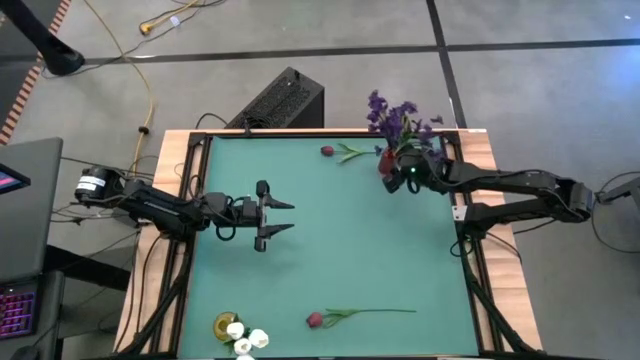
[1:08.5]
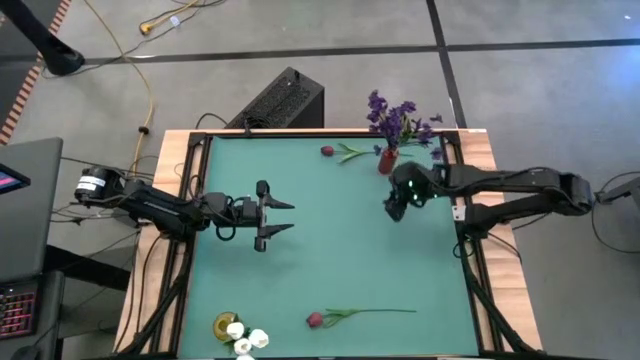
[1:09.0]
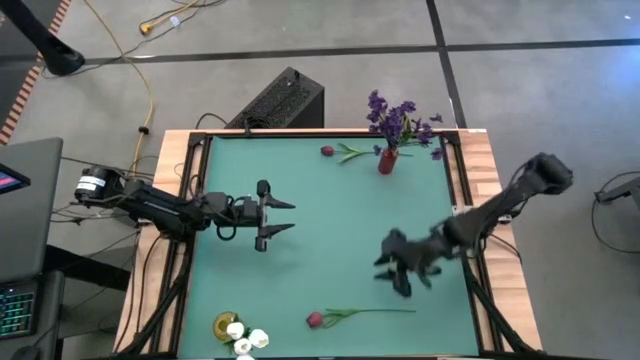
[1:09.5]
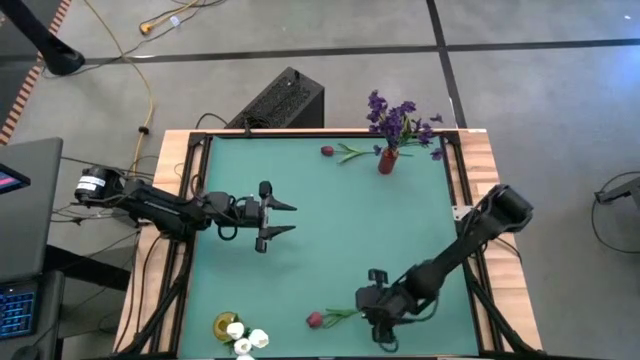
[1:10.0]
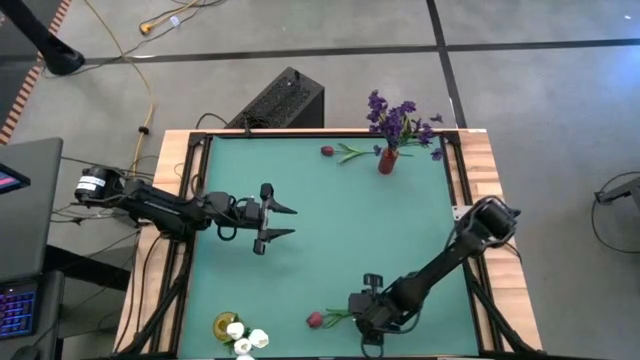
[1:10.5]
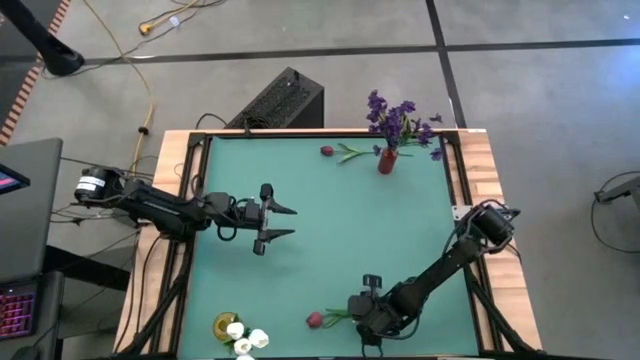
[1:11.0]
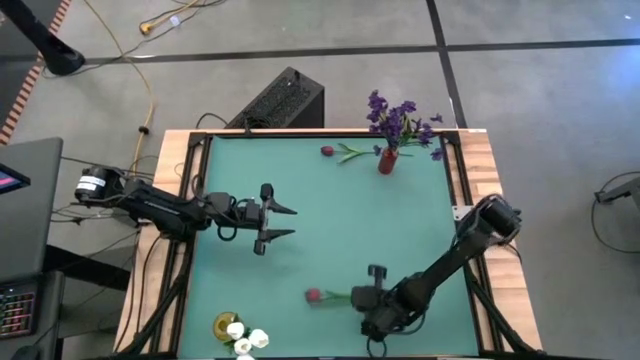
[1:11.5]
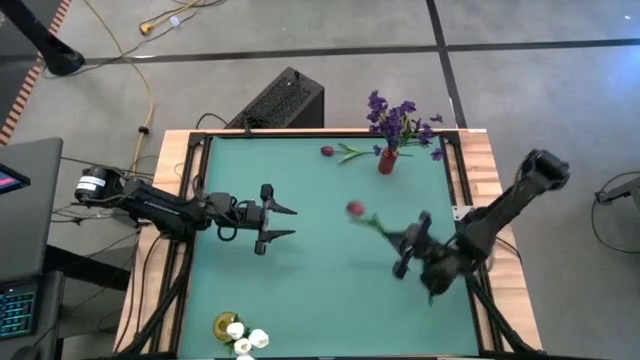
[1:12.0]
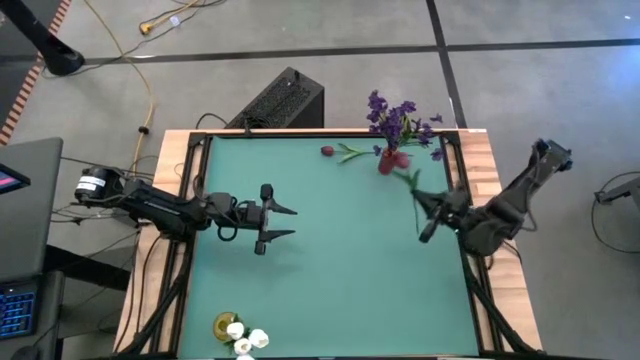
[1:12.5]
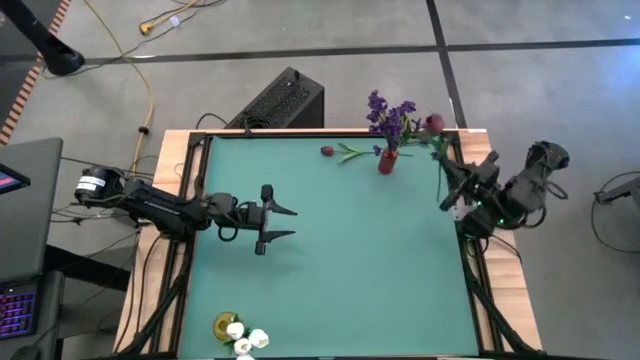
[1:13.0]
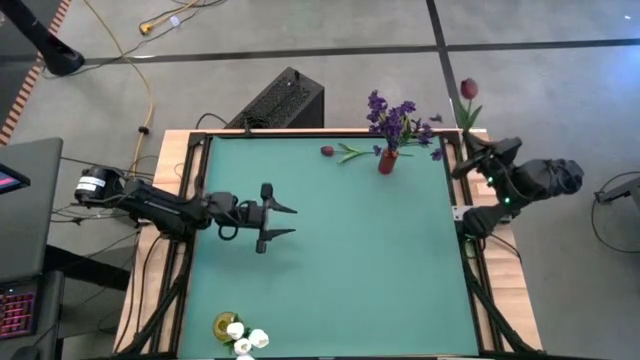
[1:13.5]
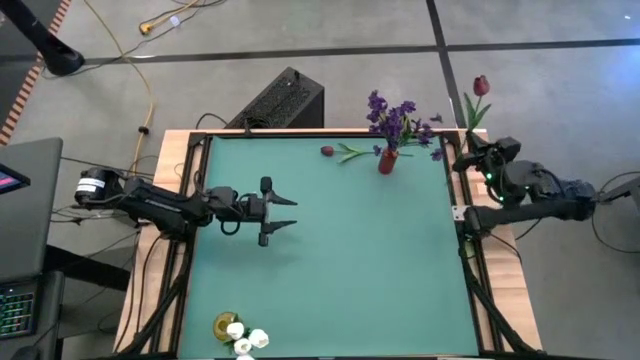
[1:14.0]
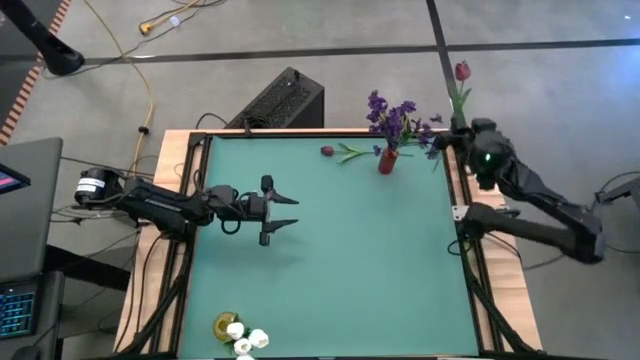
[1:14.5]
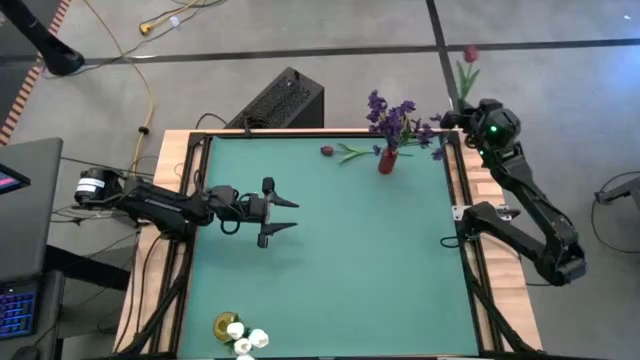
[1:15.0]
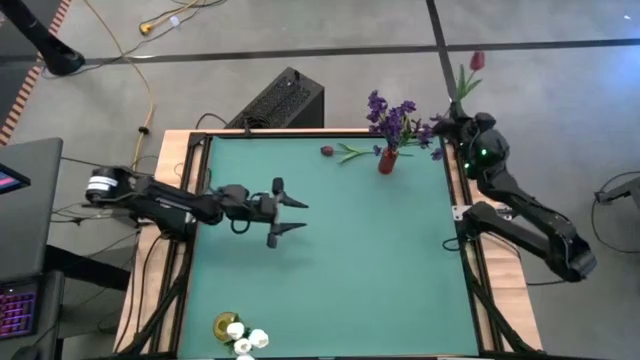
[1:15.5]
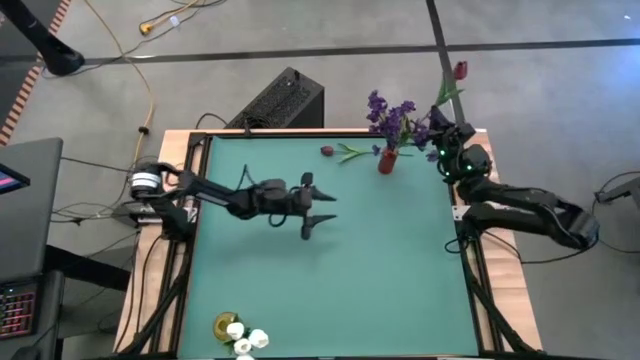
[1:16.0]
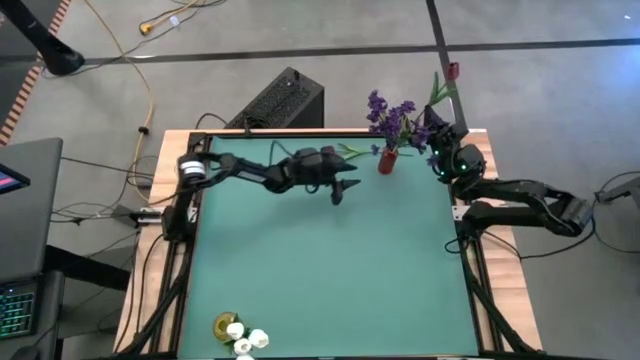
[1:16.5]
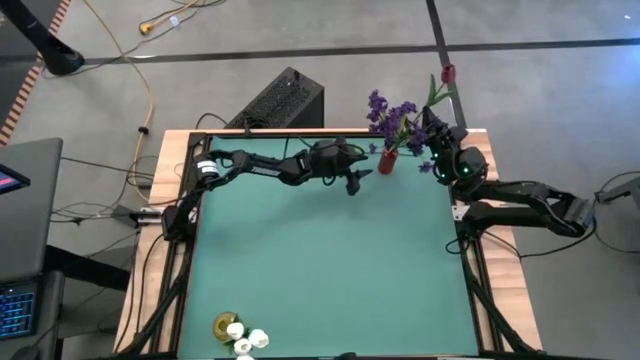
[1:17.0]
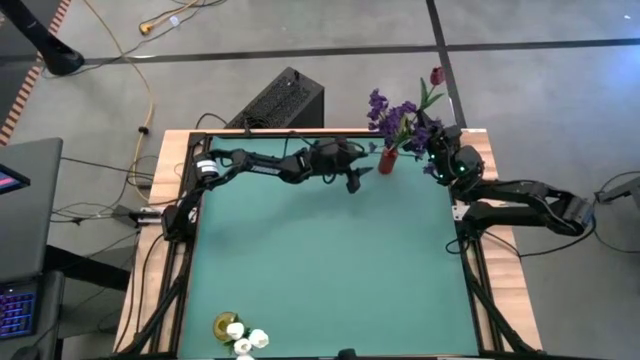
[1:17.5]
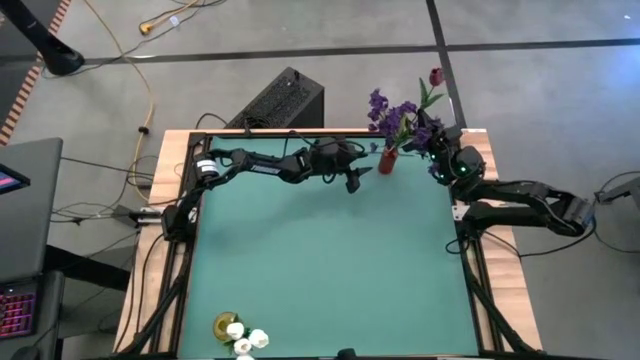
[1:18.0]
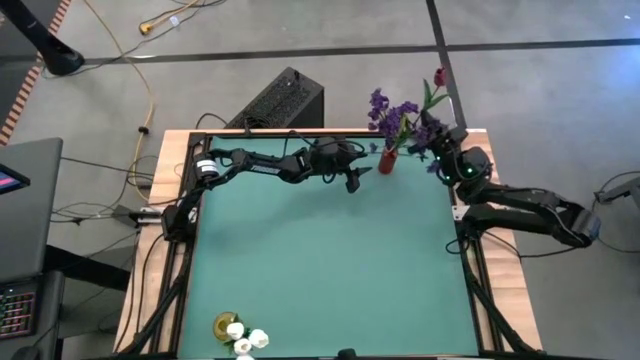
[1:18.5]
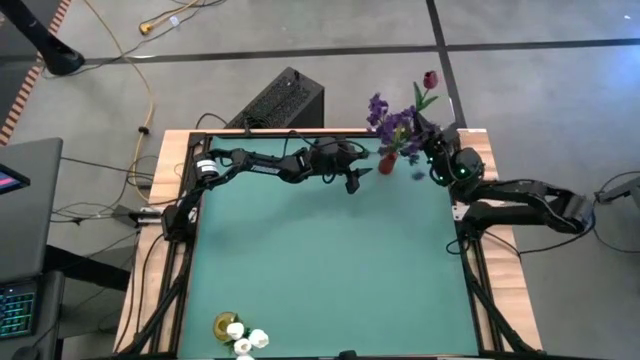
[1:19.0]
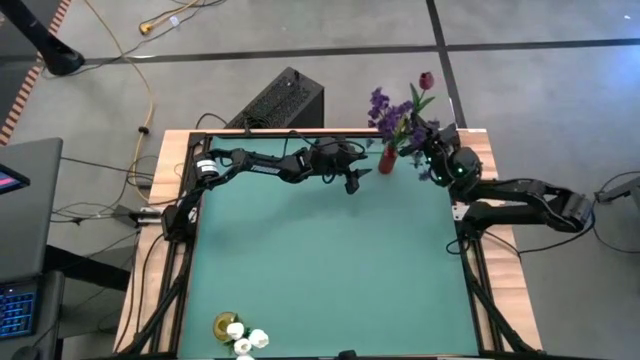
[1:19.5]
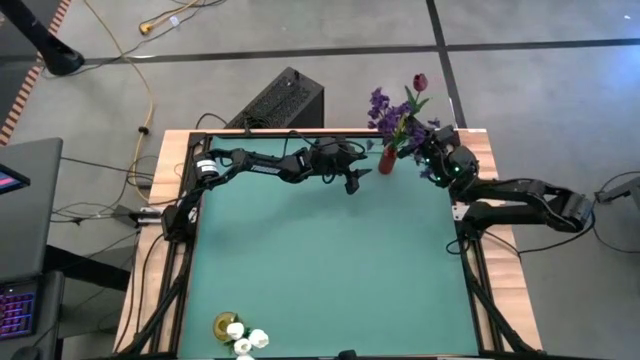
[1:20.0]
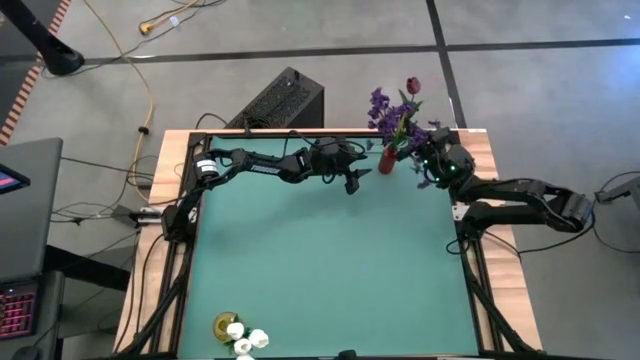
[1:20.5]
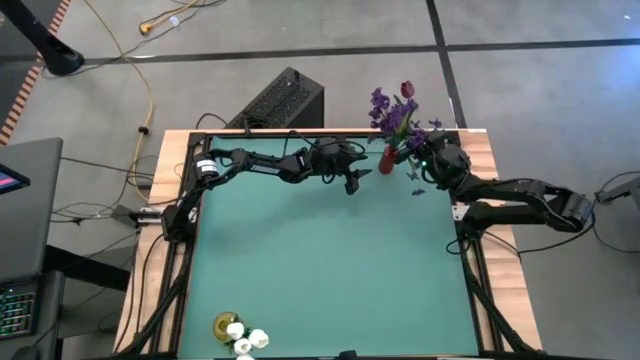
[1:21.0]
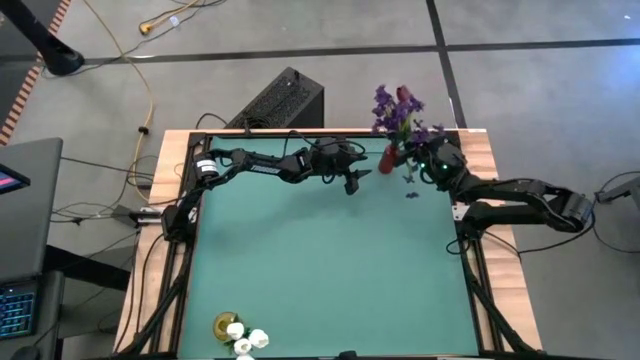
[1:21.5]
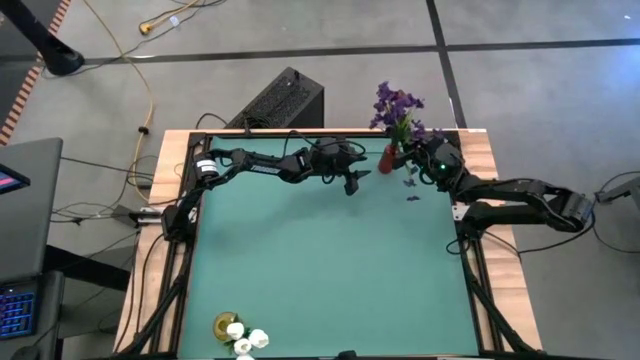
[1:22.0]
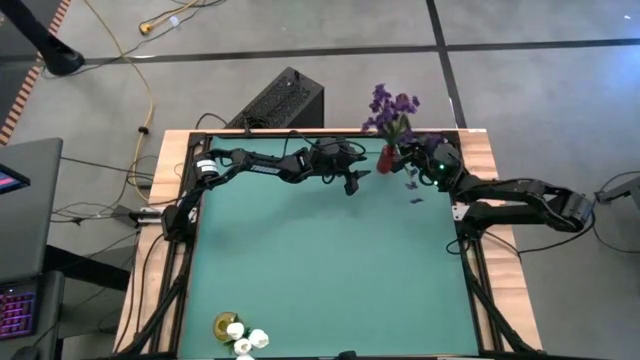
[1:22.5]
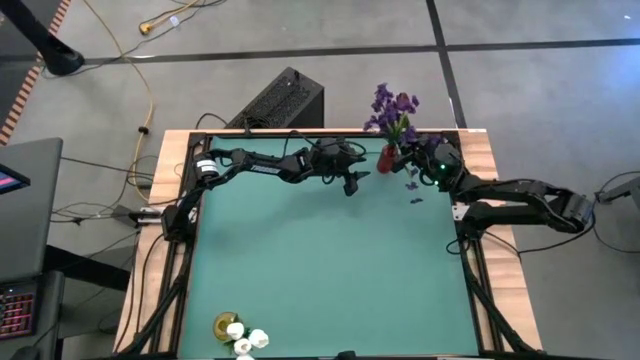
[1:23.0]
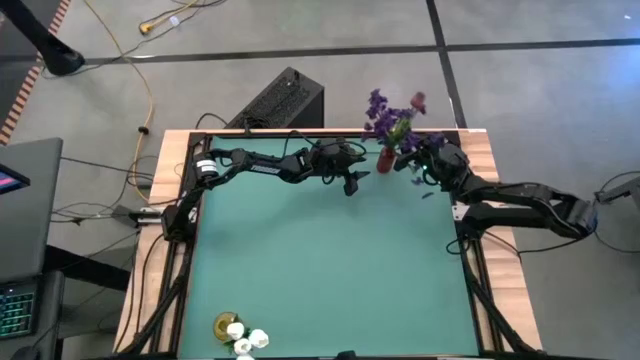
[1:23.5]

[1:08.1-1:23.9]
Task: Sort flowers into vase by color
Put the red flowers into the red vase

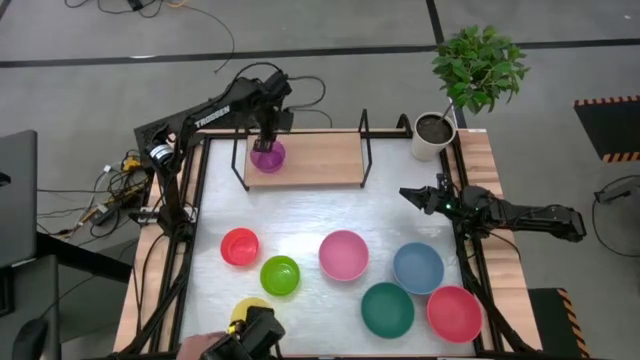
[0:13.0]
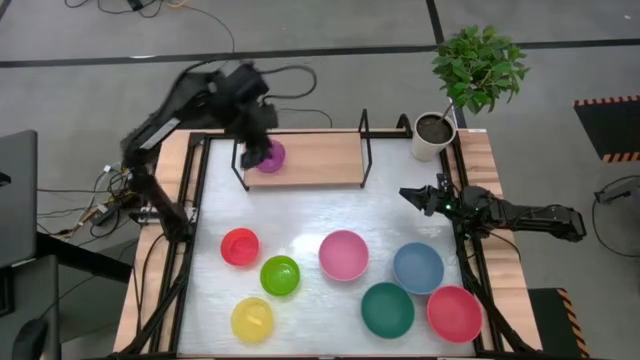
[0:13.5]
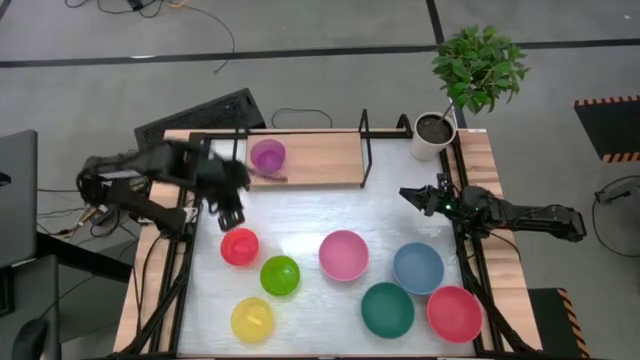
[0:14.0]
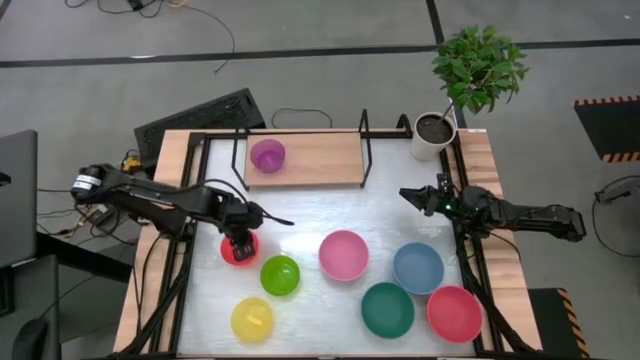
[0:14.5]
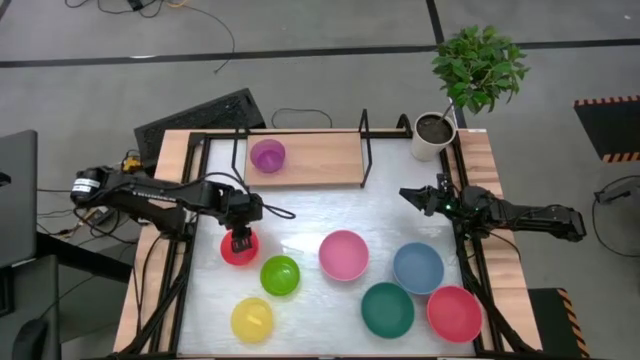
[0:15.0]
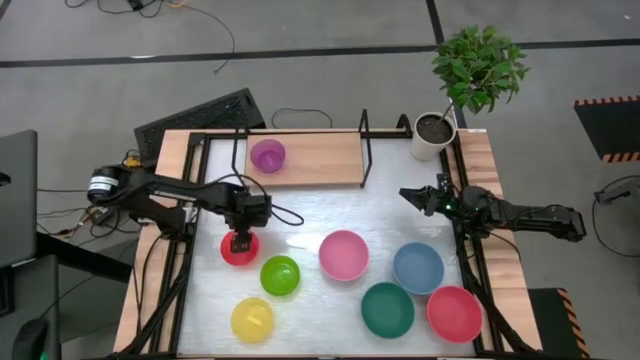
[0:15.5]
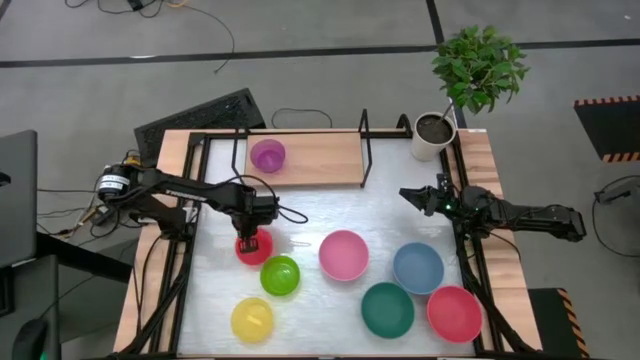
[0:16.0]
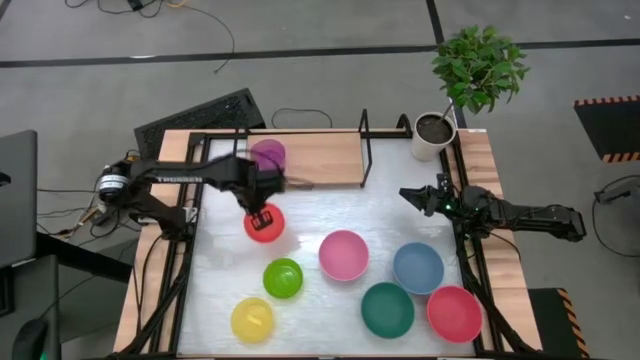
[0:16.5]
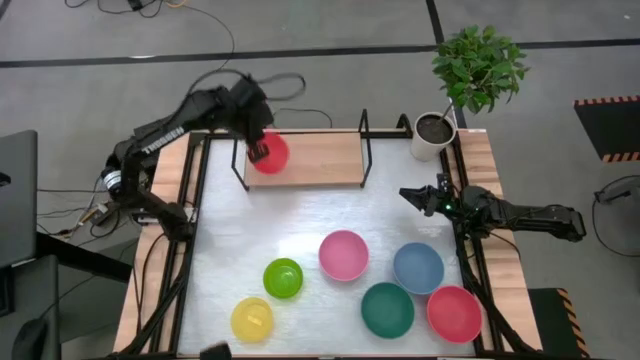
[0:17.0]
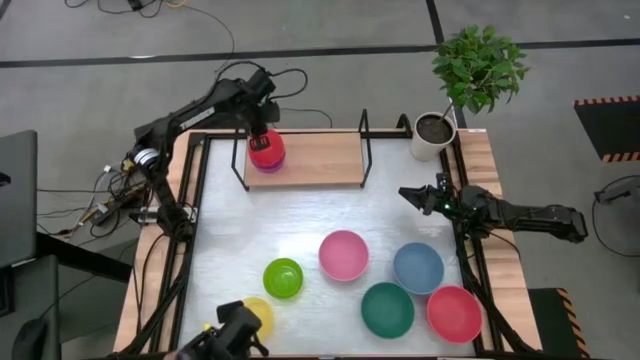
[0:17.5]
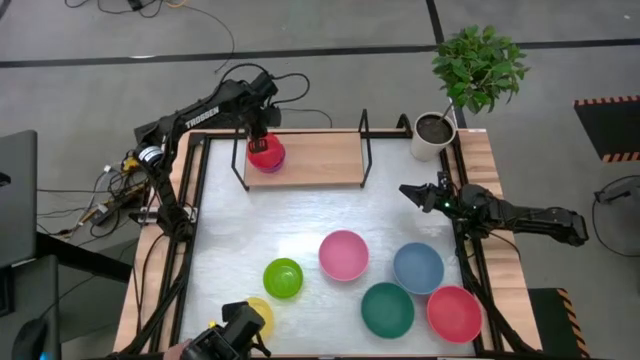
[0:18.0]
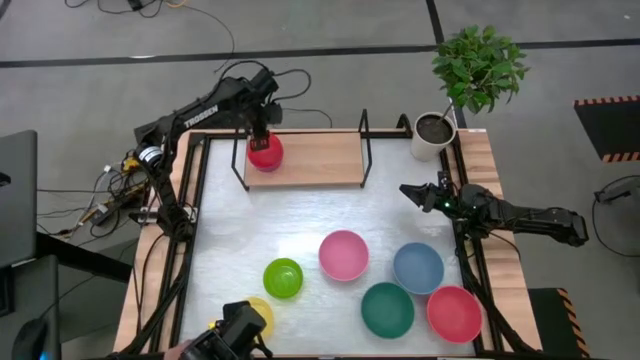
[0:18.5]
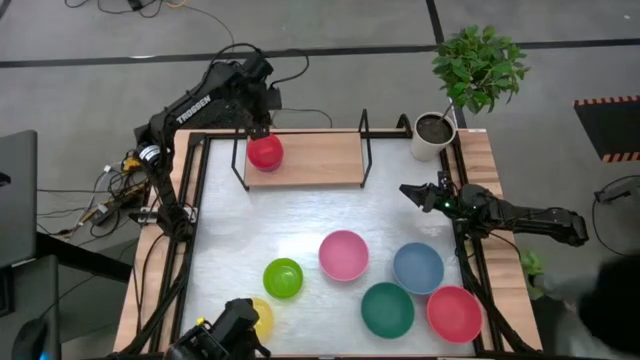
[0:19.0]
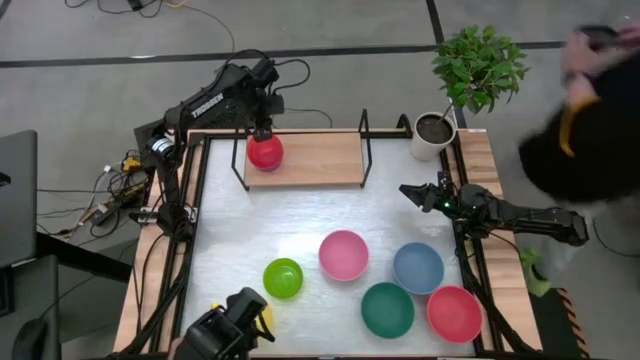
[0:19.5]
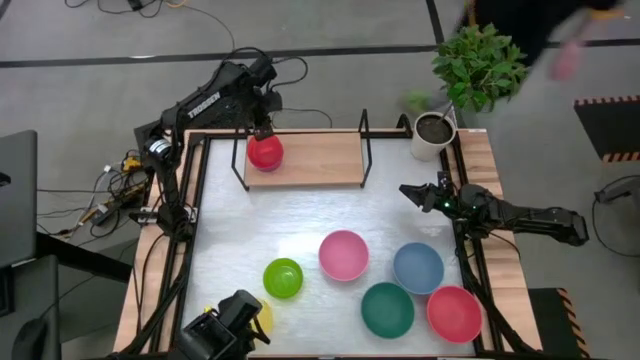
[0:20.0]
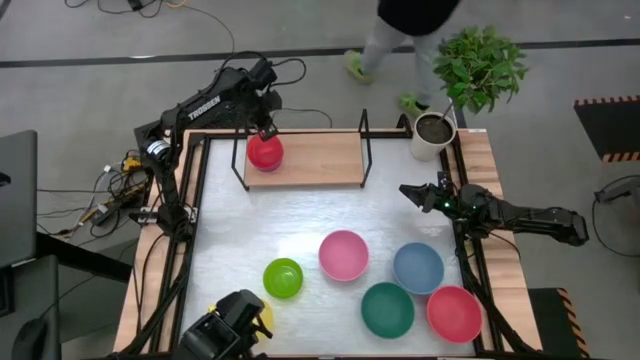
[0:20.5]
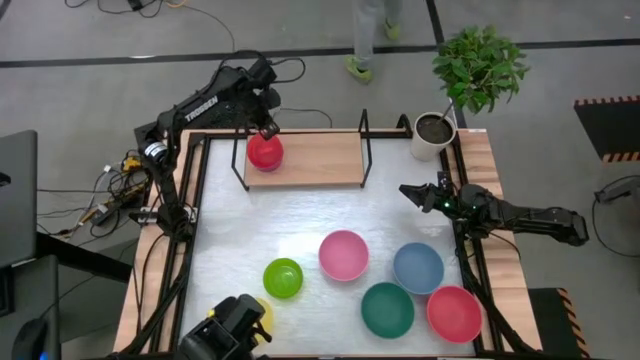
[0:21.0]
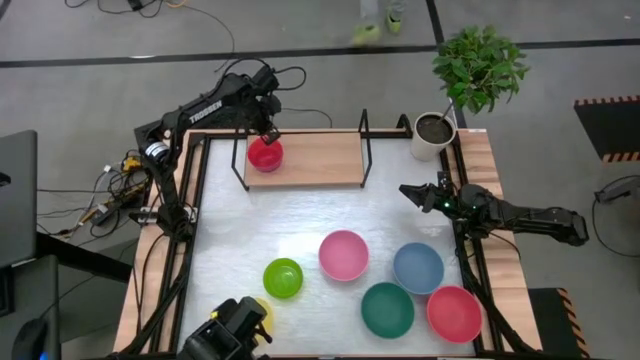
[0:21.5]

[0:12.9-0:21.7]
Task: Place and stack bowls onto a shelf
Stack the orange transparent bowl on top of the purple transparent bowl on the shelf
